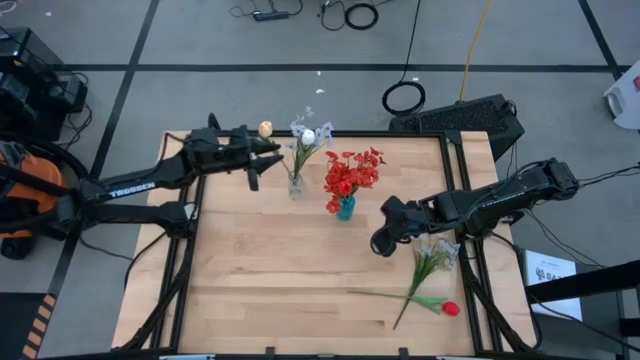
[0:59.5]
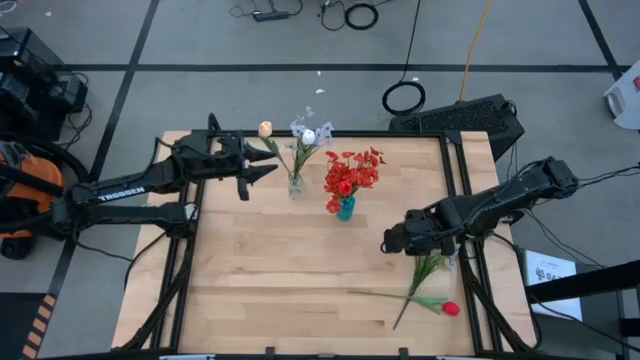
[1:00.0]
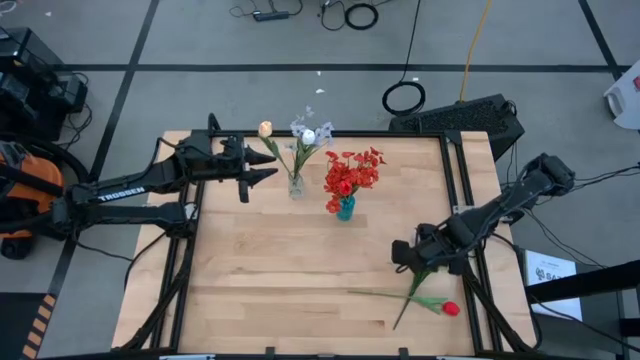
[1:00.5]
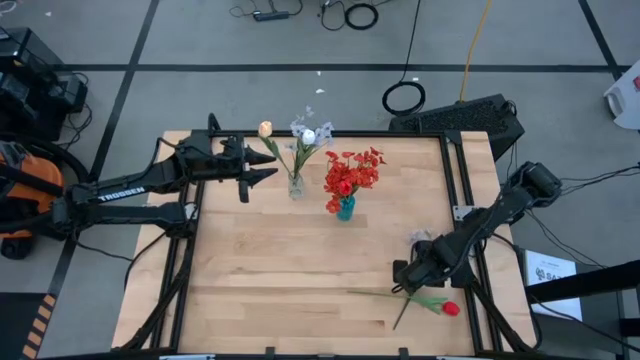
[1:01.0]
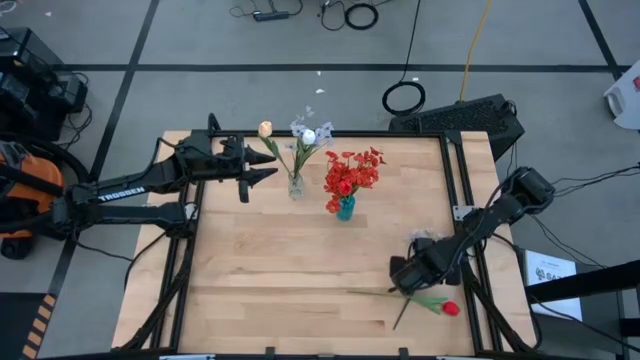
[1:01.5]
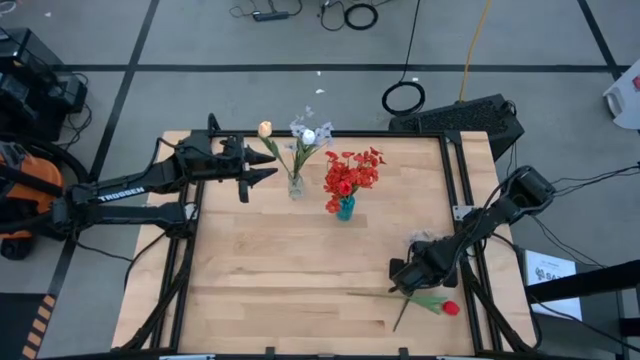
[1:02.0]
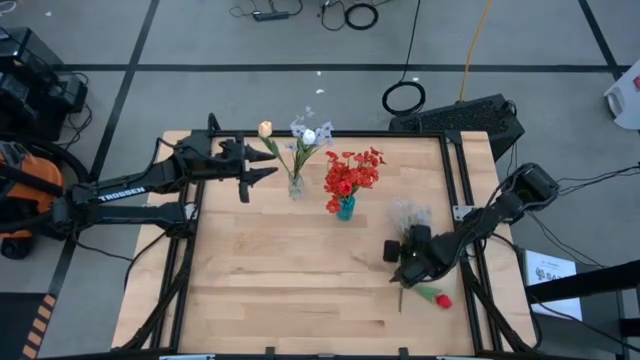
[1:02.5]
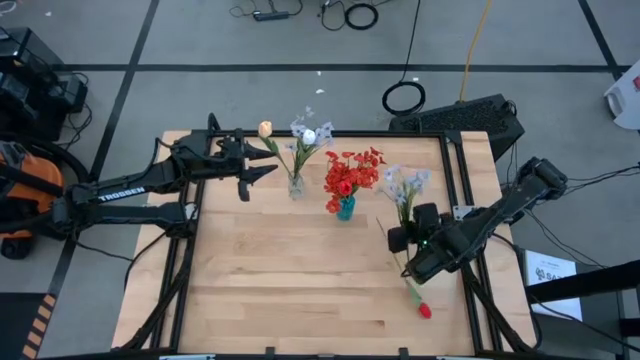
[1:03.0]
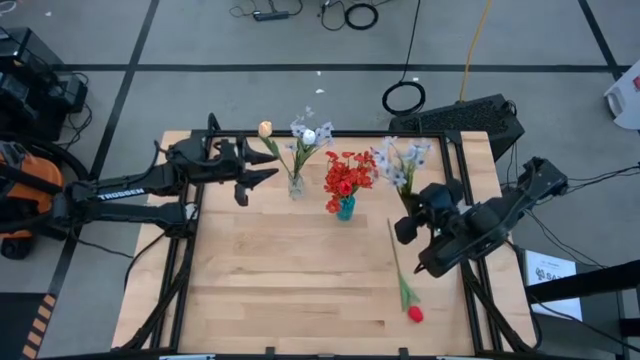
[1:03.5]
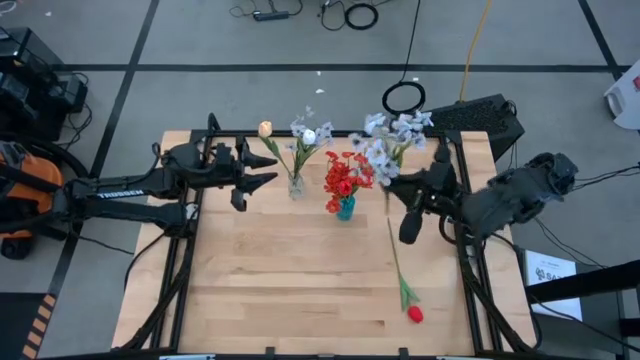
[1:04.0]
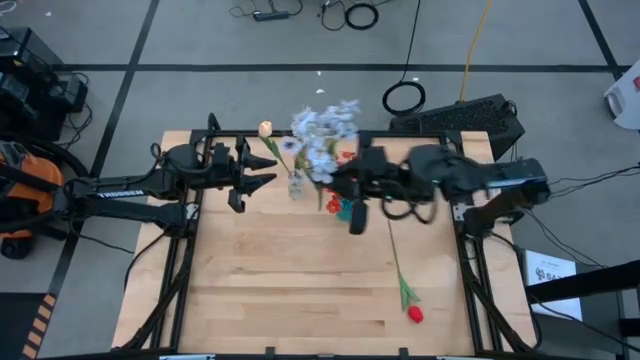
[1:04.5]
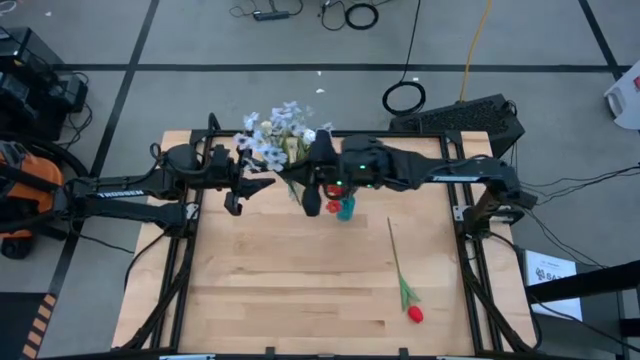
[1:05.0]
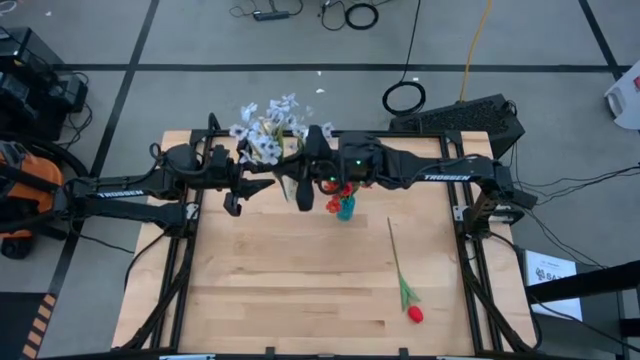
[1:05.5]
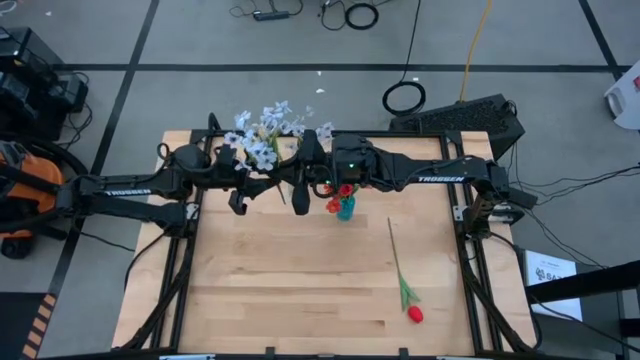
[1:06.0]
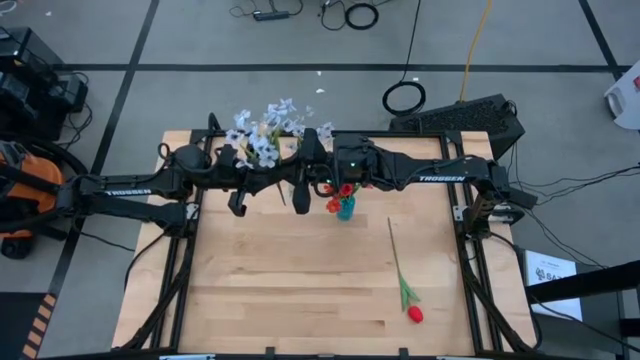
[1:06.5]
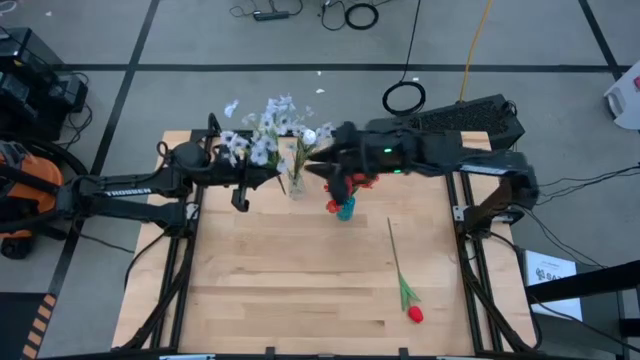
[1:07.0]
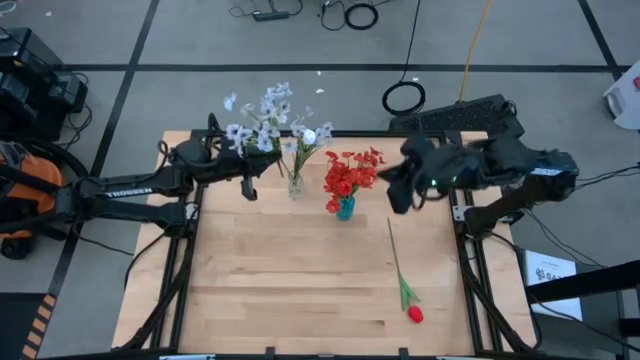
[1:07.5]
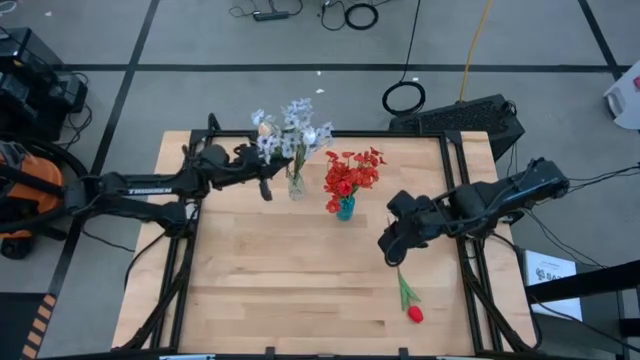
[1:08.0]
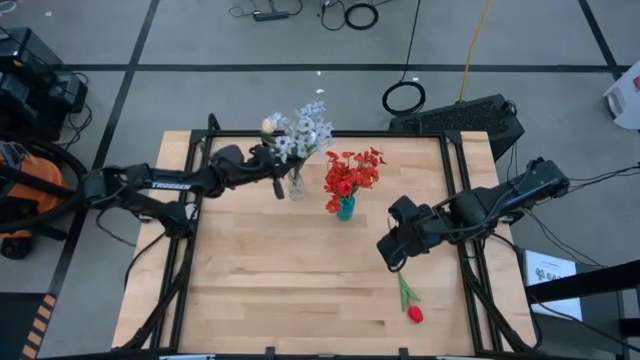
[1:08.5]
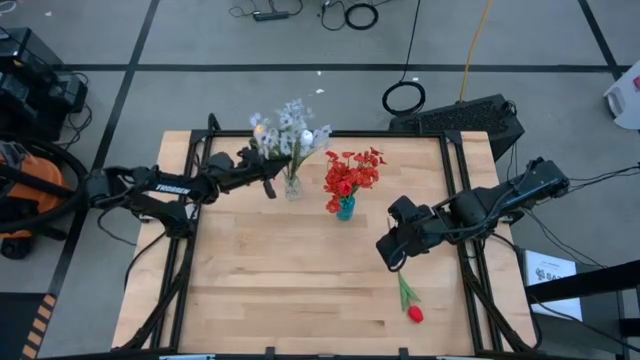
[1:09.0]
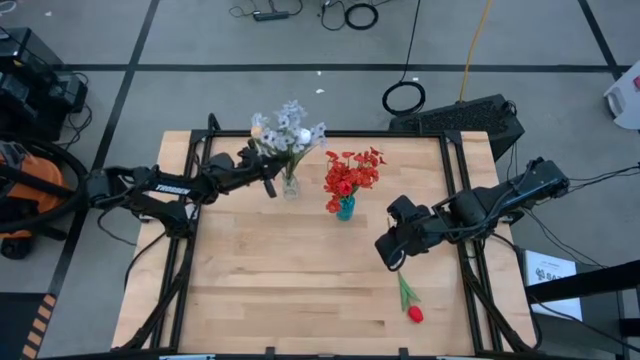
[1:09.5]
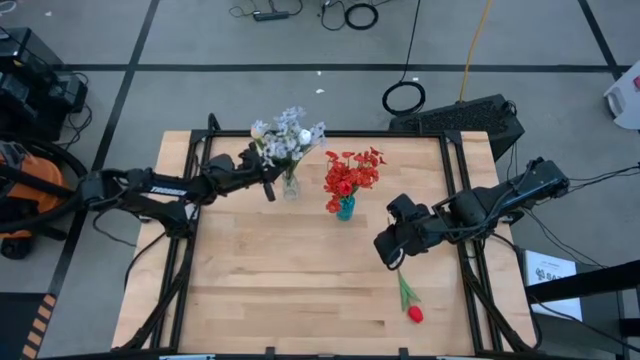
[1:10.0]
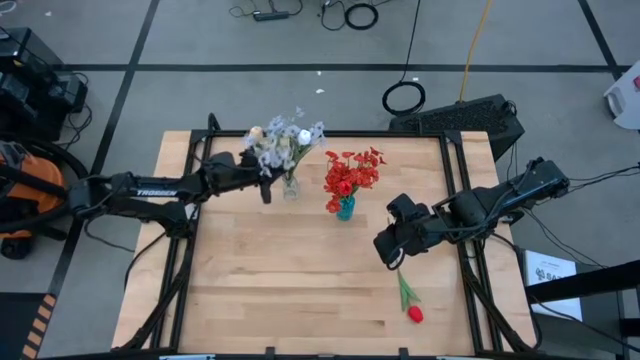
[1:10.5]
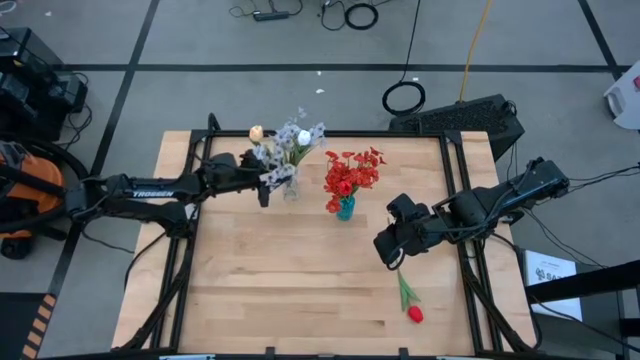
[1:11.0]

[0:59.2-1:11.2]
Task: Sort flowers into vase by color
Put the white flowers into the transparent vase

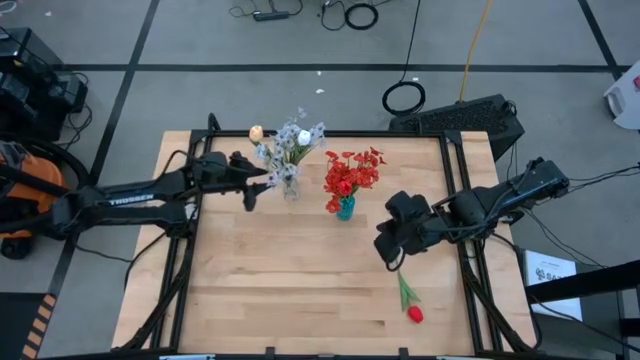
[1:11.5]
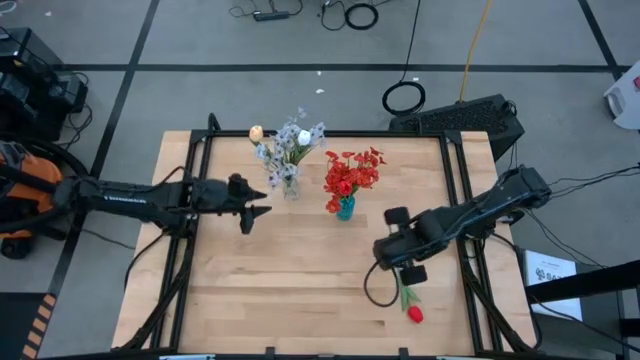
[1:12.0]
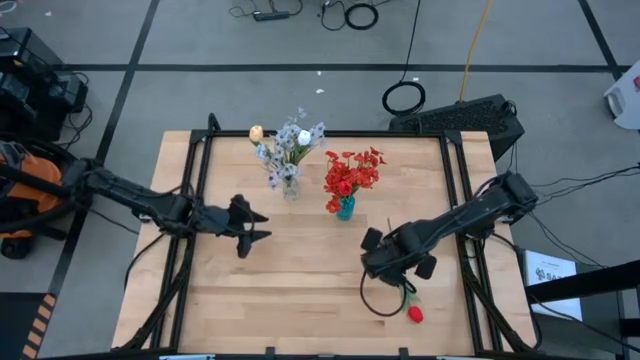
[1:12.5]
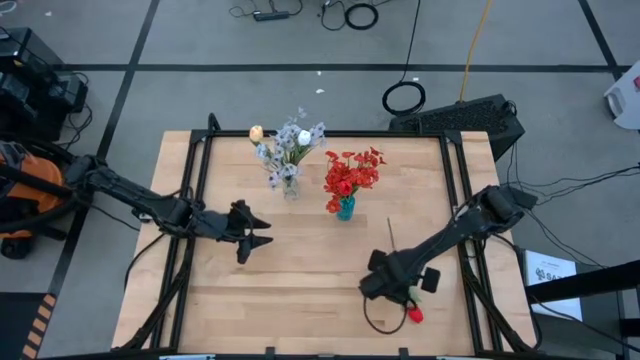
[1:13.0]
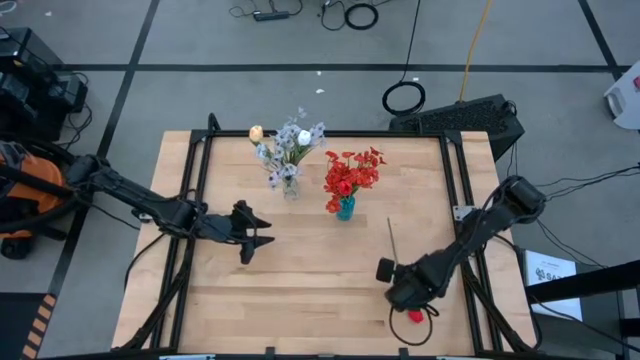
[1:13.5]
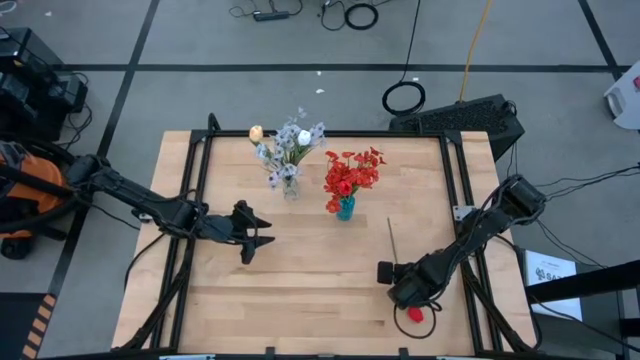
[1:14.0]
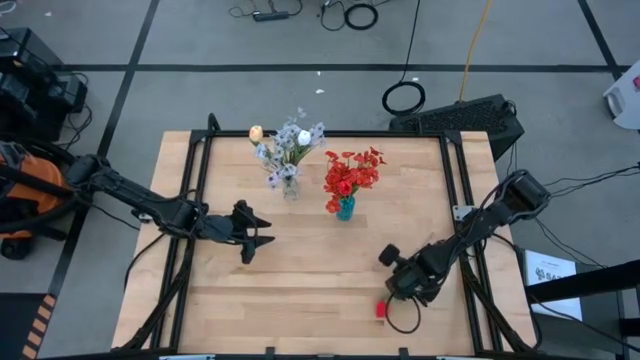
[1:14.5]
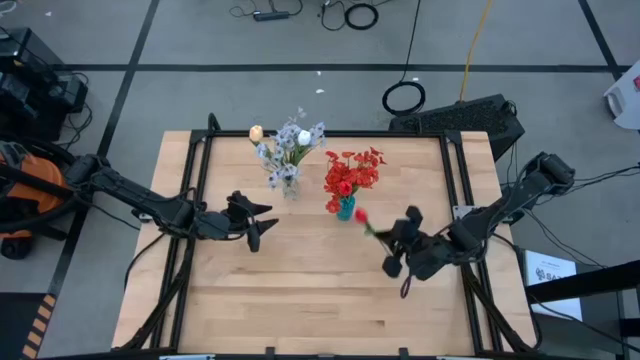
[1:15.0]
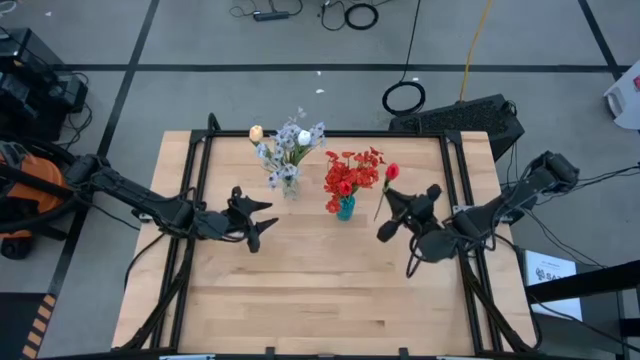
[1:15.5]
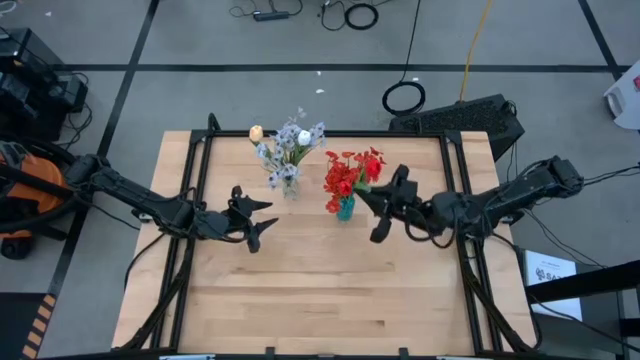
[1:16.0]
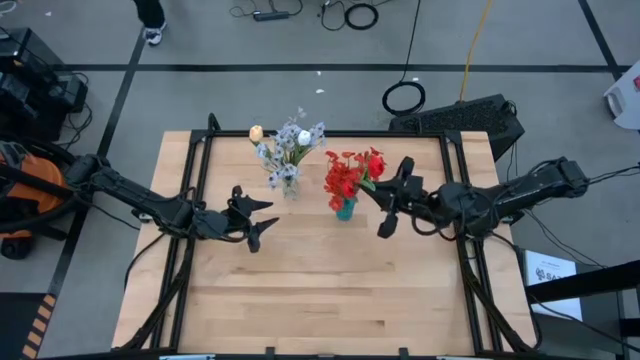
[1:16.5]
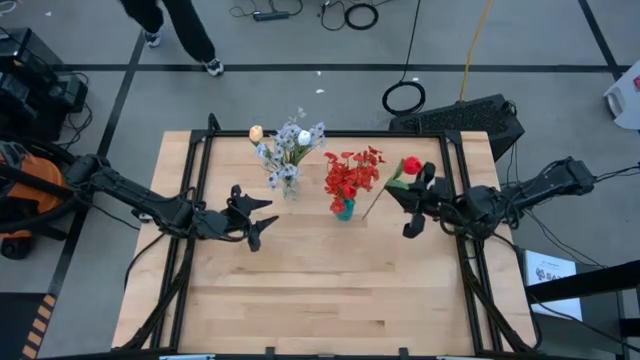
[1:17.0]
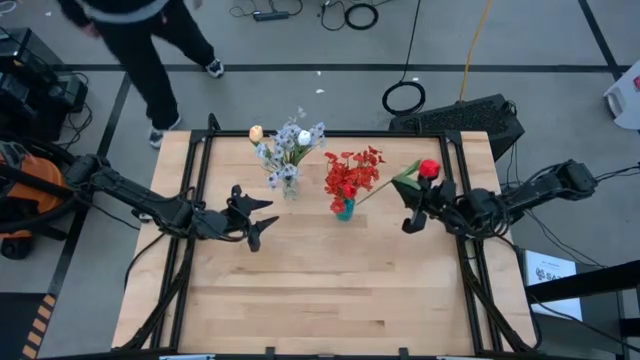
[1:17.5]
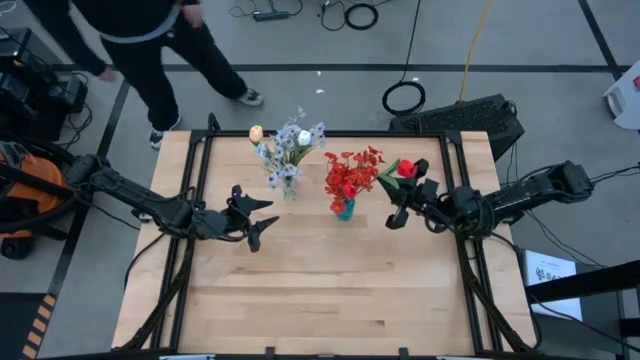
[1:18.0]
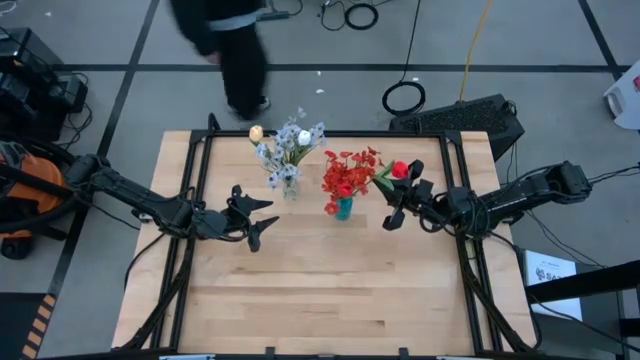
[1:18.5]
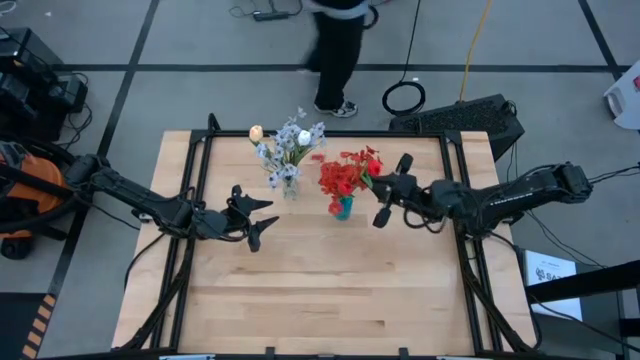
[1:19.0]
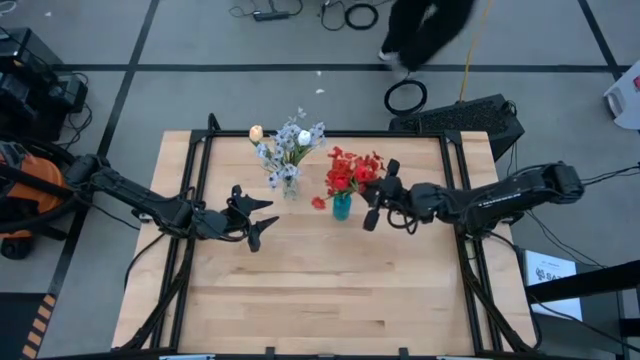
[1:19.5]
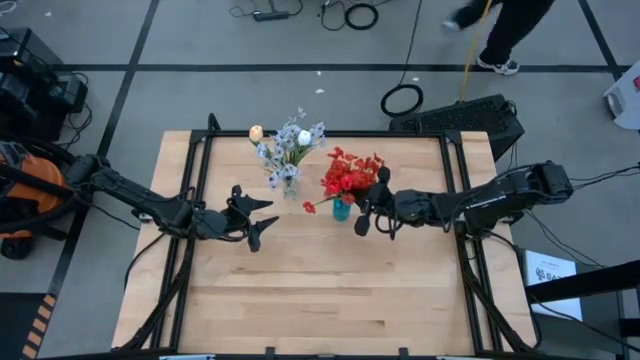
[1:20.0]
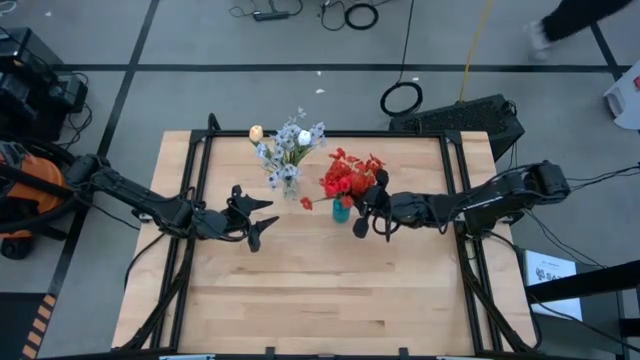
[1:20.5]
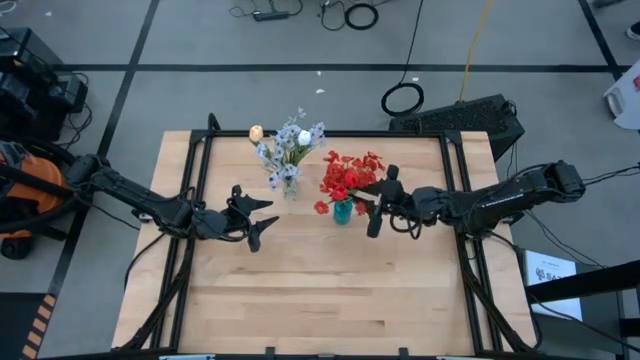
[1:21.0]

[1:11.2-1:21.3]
Put the red tulip into the transparent vase

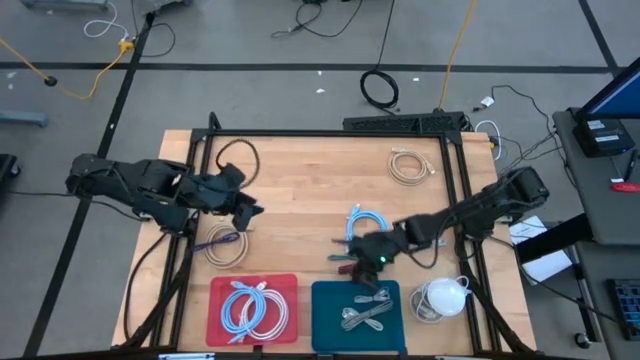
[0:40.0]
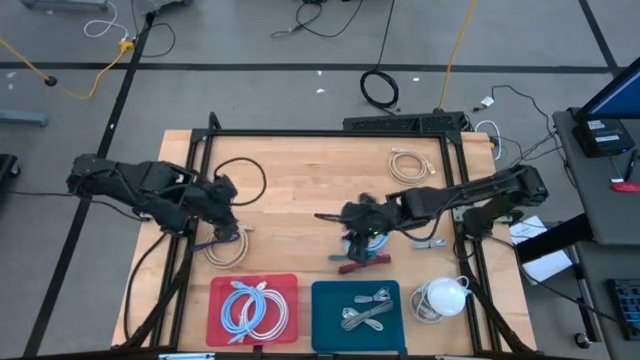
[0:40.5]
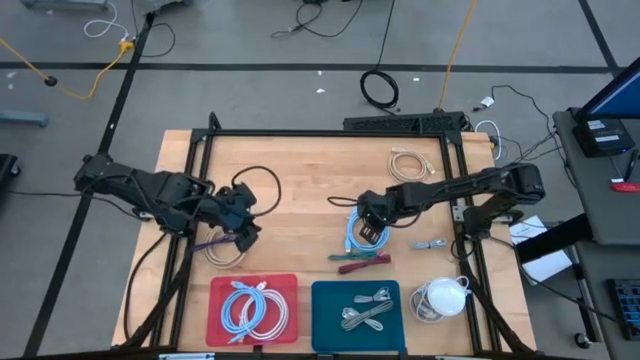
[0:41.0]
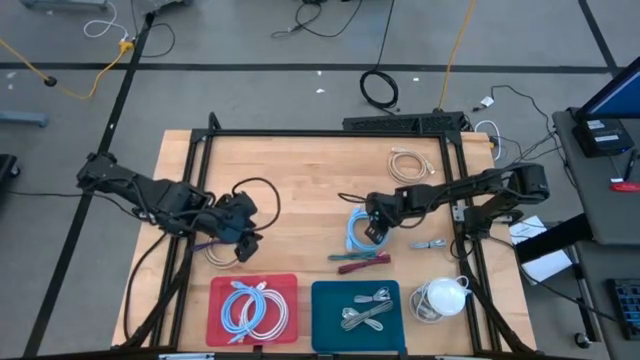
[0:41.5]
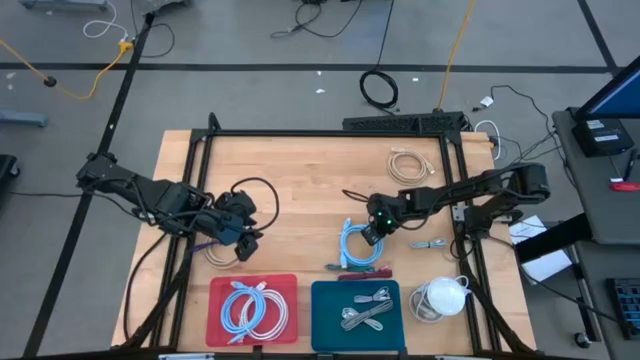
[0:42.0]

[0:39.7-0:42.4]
Task: Pick & Place USB Port
Put the sky blue HDMI cable into the red bin
